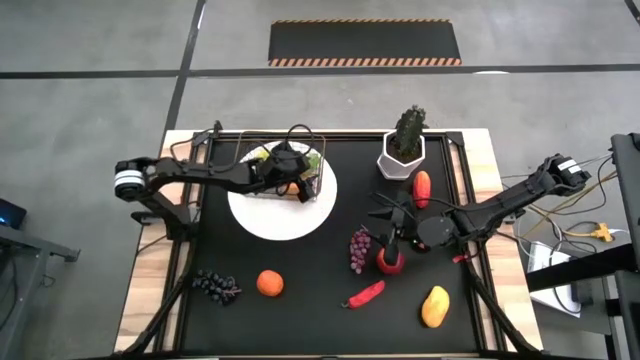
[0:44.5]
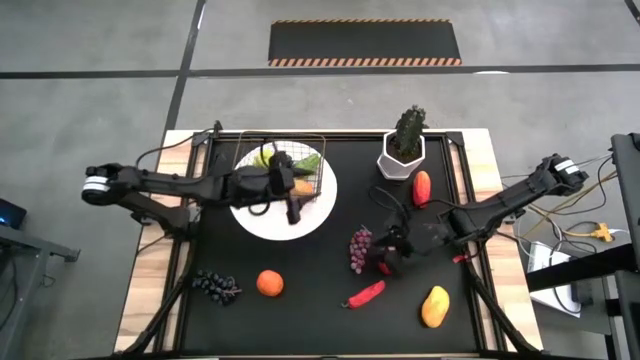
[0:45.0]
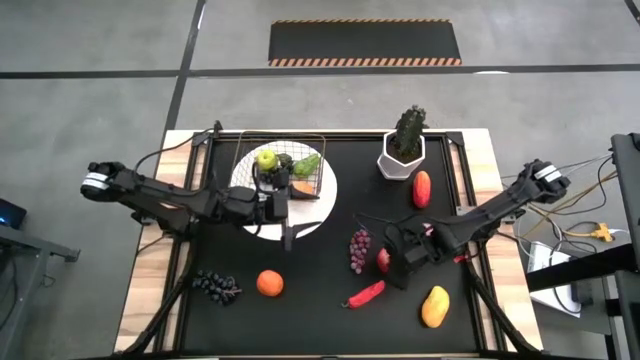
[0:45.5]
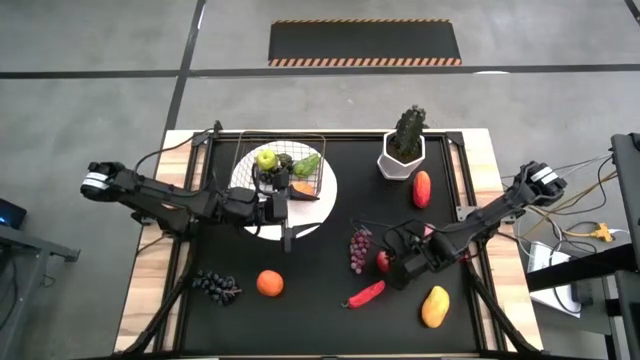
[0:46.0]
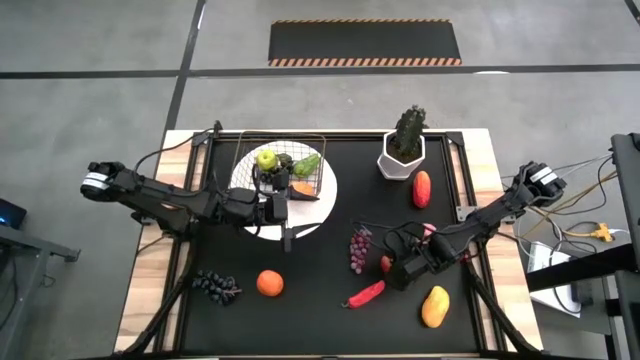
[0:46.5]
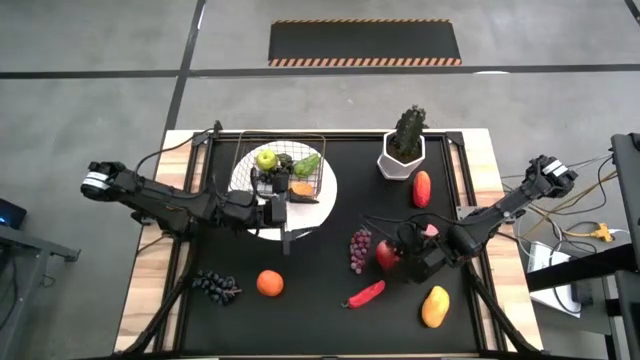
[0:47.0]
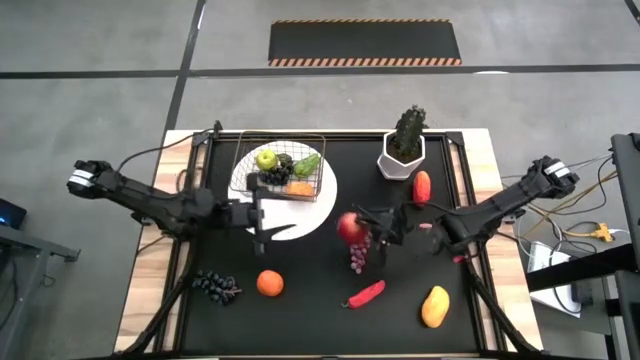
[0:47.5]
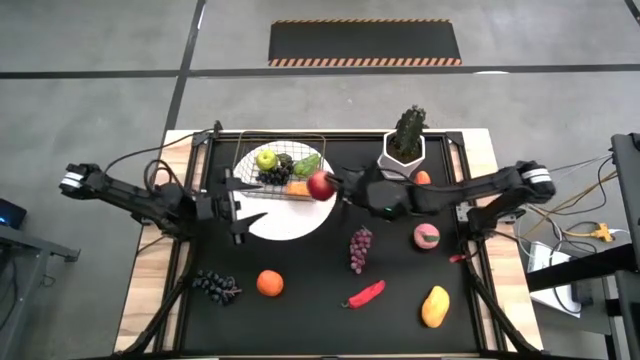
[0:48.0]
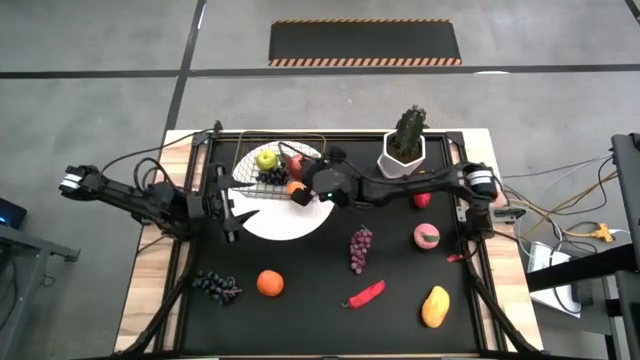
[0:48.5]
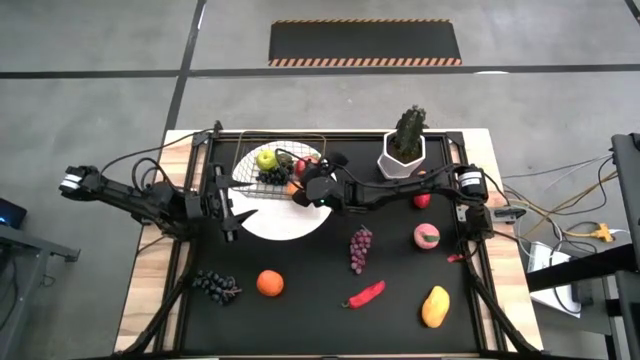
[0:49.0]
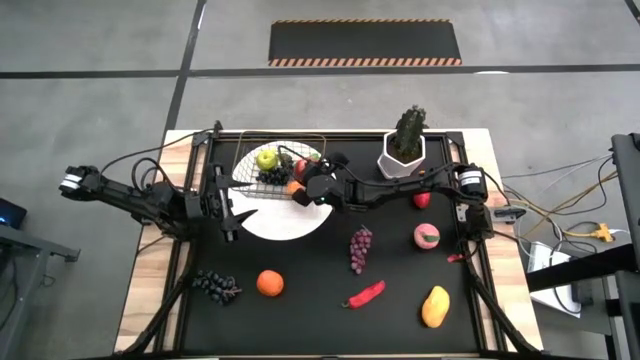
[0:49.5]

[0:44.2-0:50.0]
Task: Build produce basket
Put the pomegranate in the gold wire basket

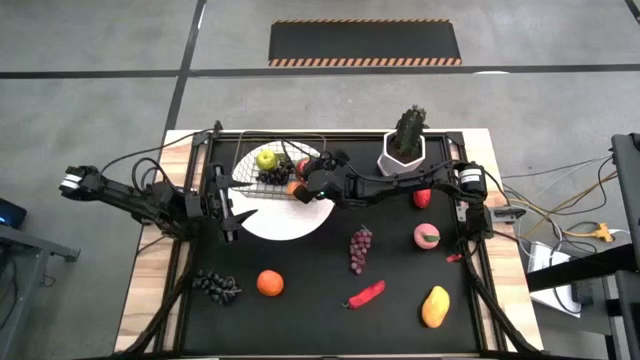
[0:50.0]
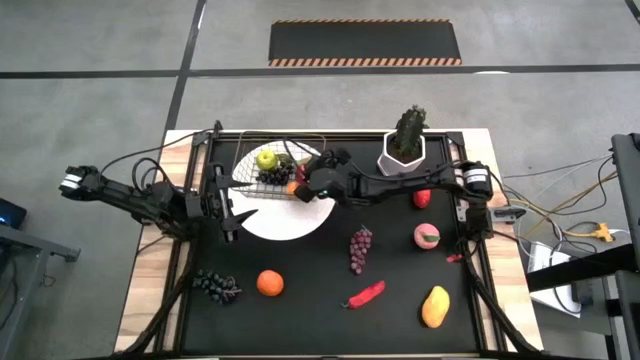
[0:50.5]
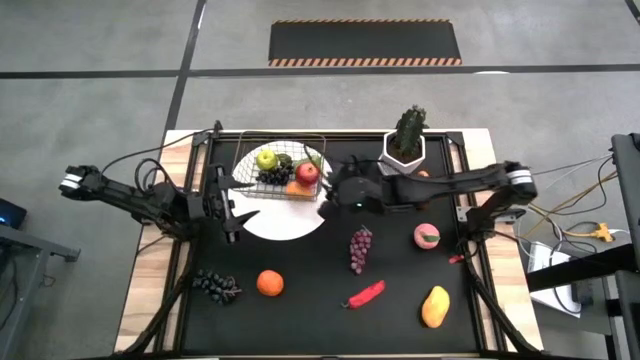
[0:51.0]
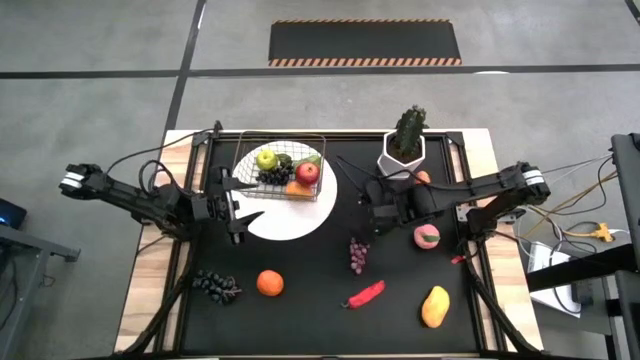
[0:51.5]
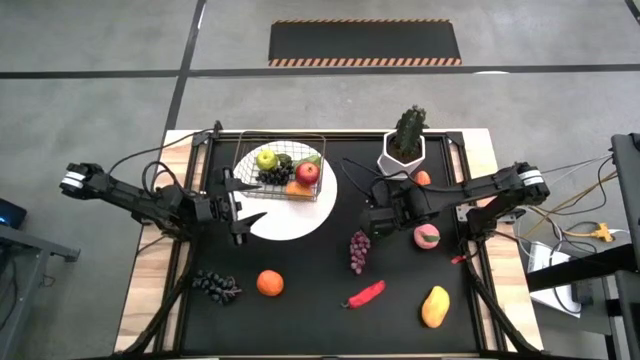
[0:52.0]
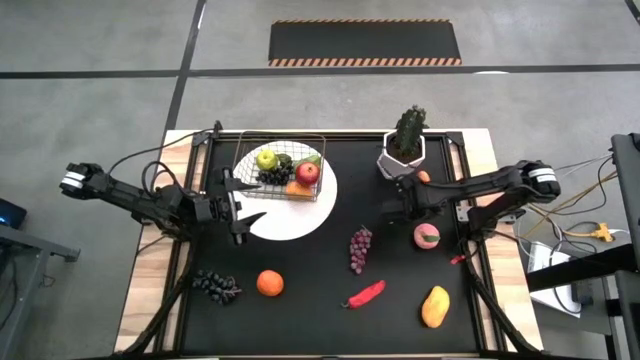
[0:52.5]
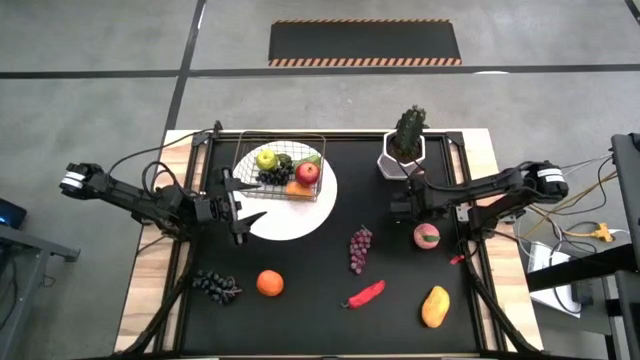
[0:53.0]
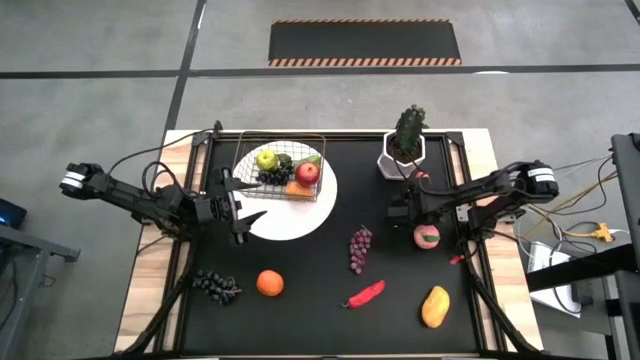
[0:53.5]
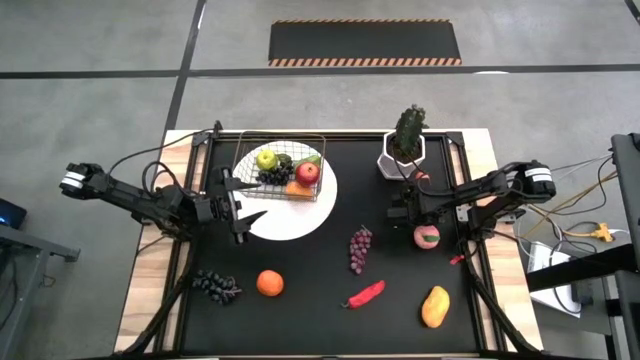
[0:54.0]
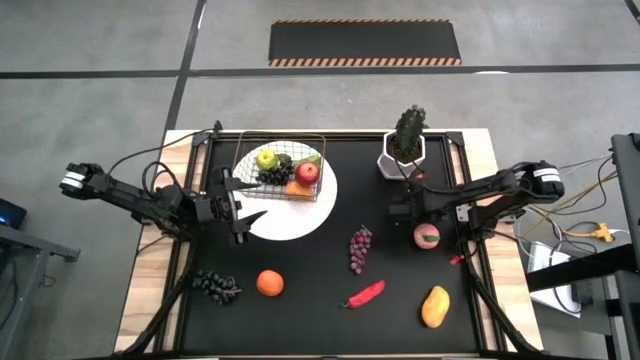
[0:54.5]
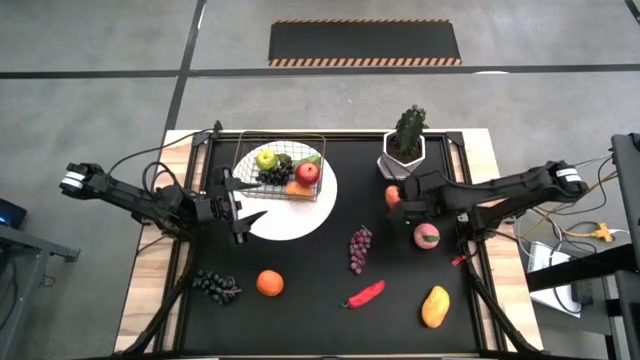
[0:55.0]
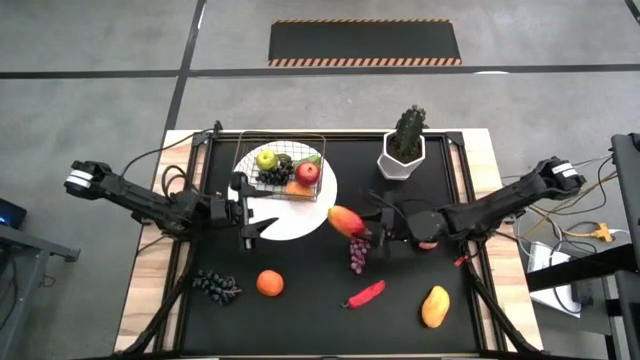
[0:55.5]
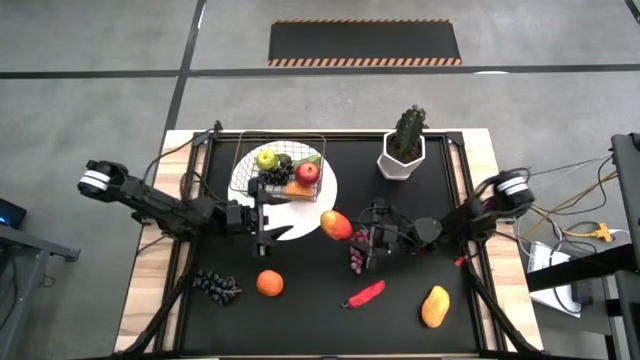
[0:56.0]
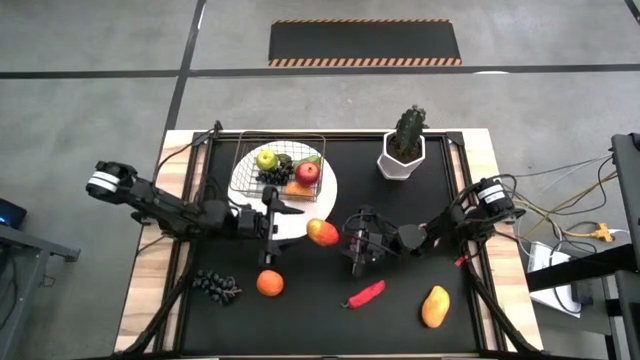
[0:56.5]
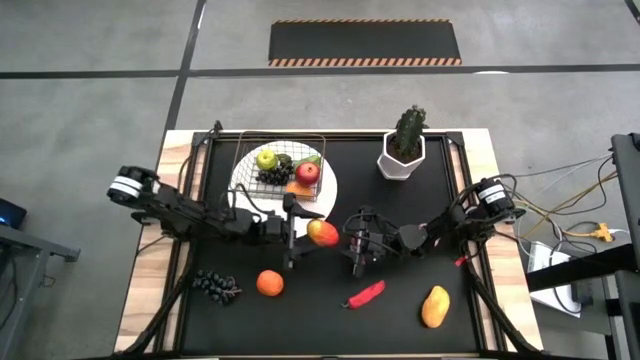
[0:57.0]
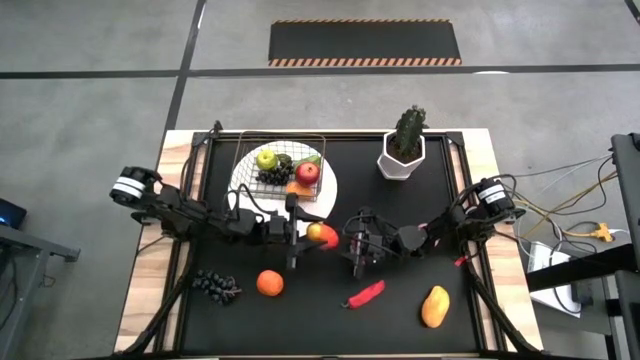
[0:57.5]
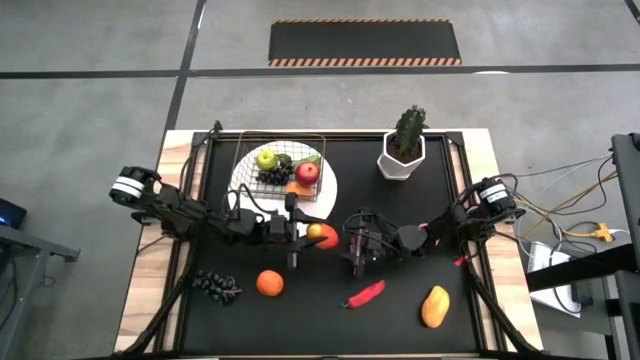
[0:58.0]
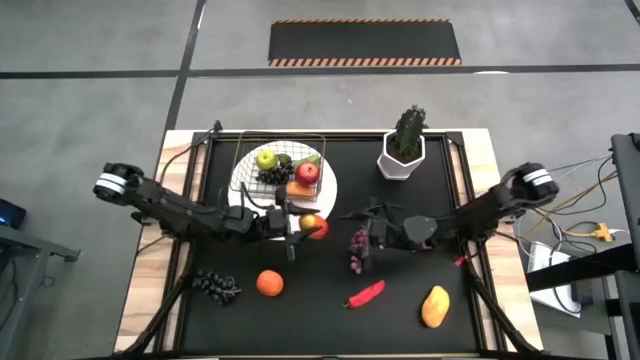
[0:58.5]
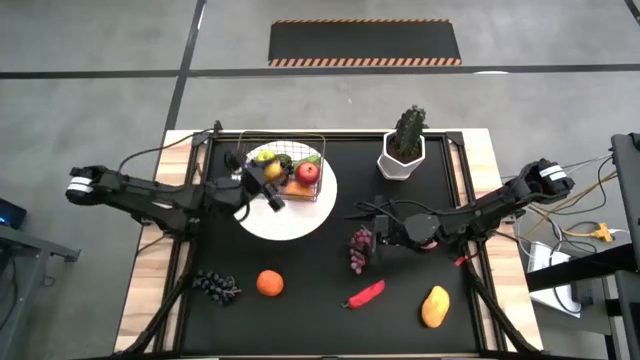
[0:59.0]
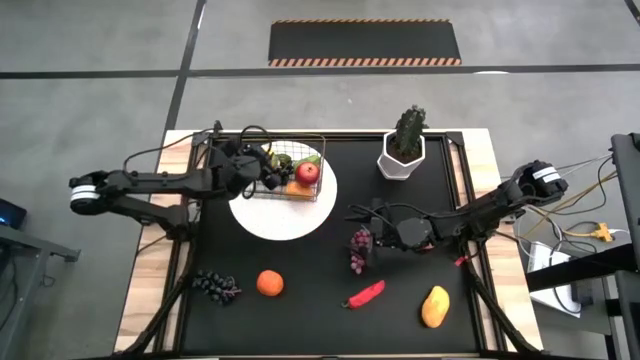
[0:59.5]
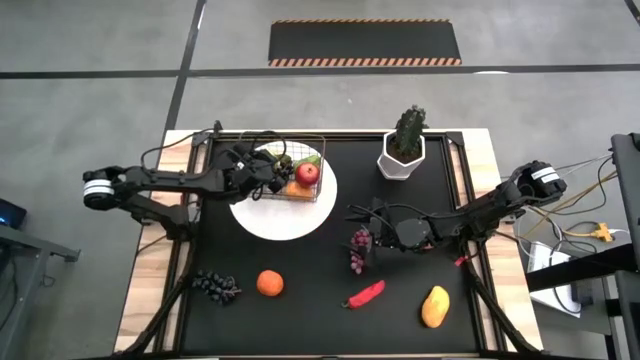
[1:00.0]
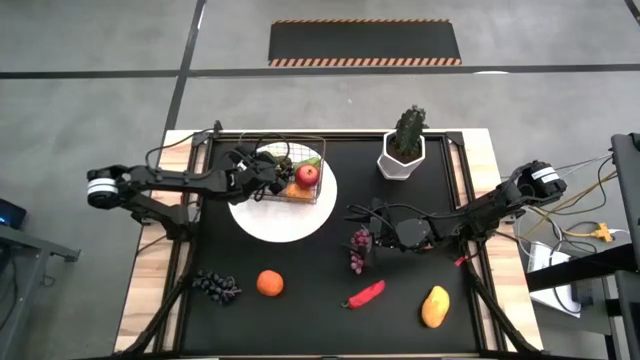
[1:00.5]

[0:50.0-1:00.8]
Put the top mango in the gold wire basket

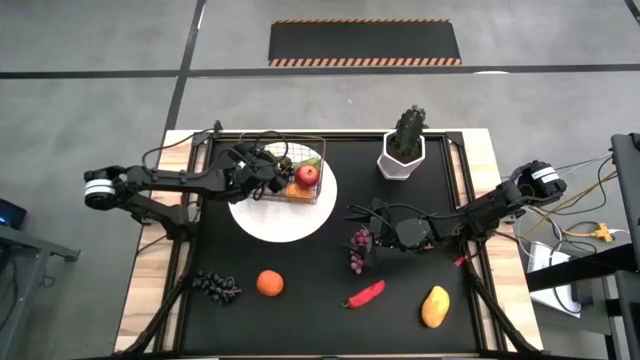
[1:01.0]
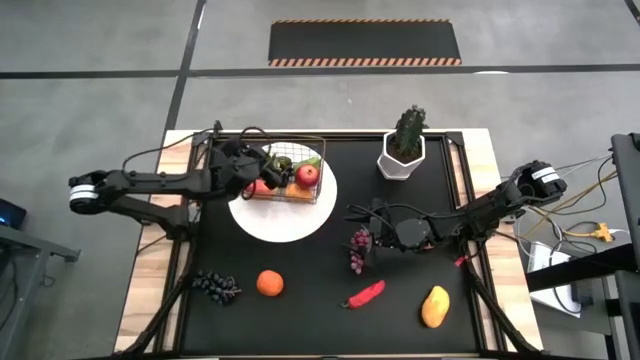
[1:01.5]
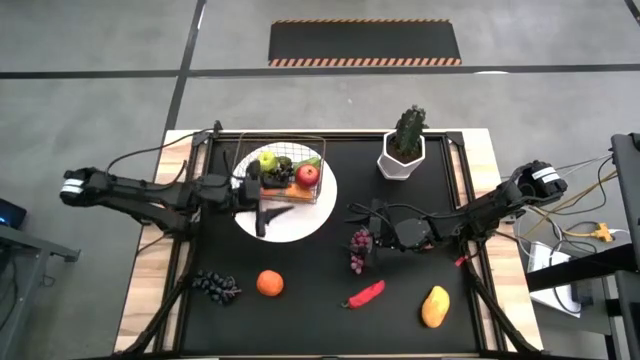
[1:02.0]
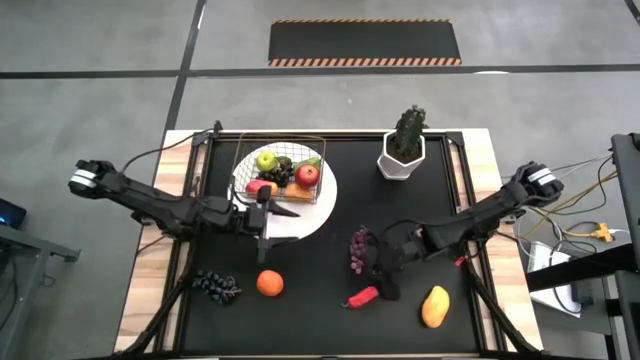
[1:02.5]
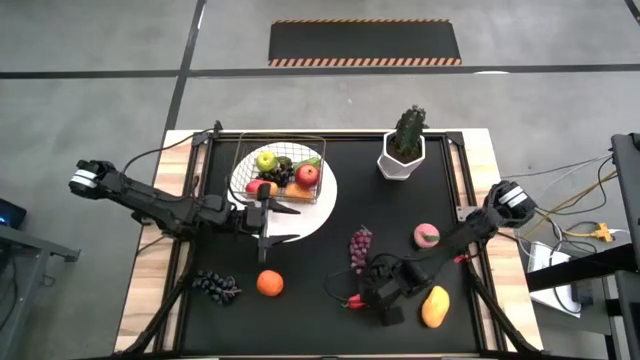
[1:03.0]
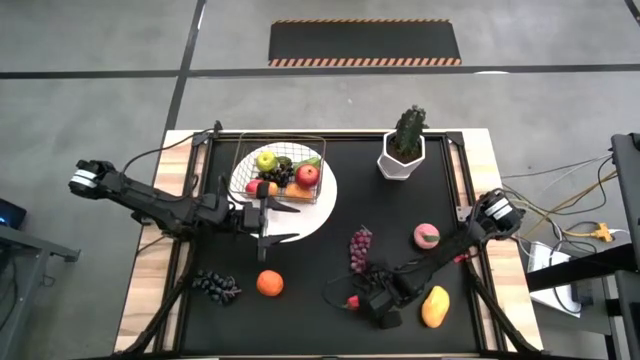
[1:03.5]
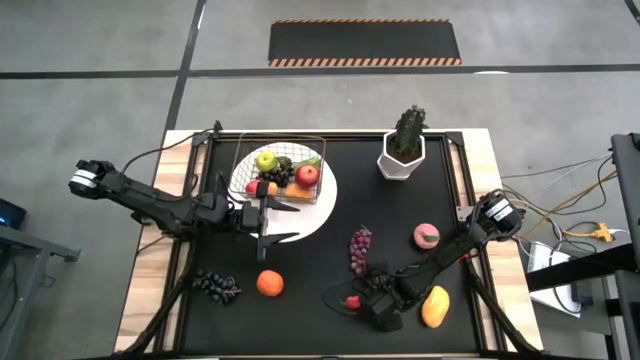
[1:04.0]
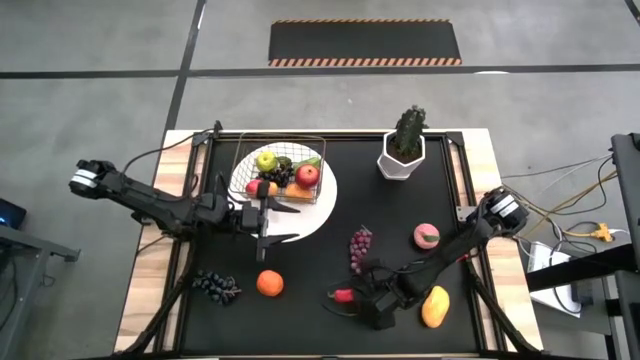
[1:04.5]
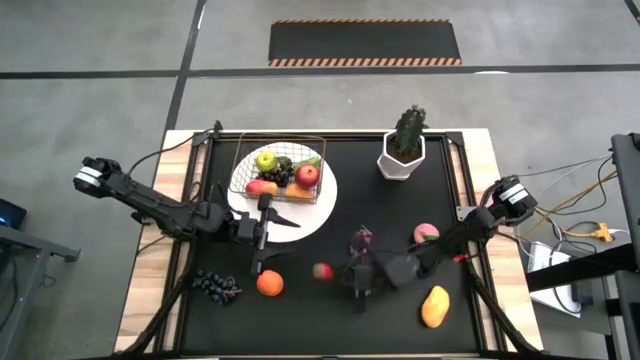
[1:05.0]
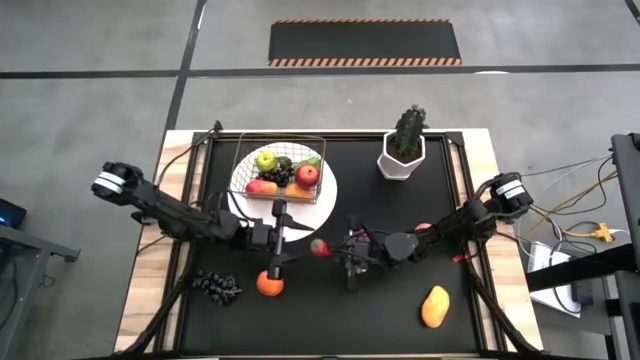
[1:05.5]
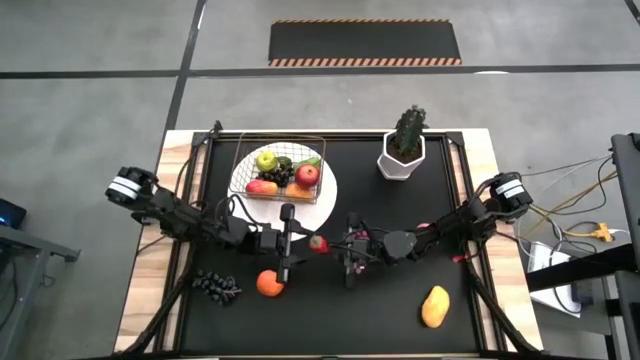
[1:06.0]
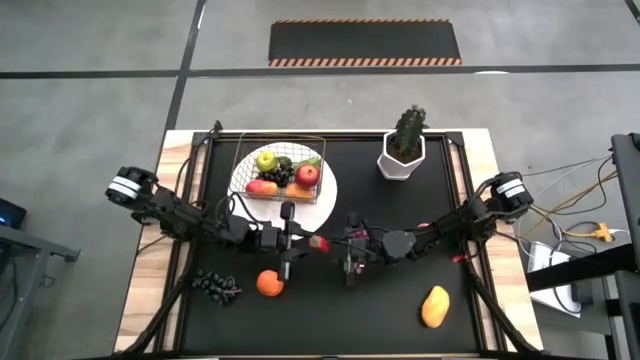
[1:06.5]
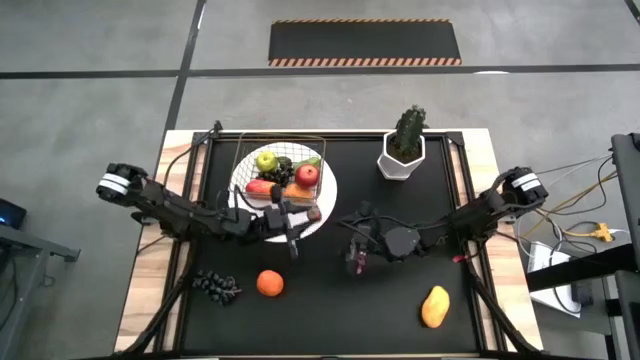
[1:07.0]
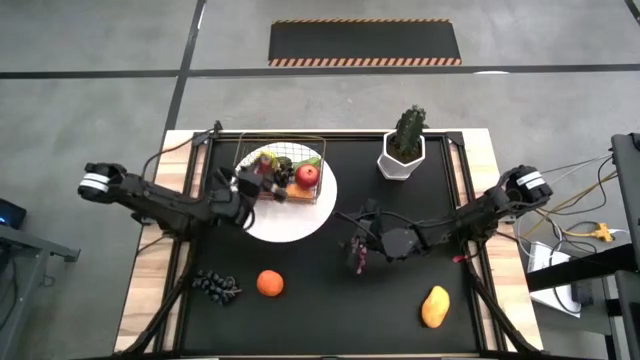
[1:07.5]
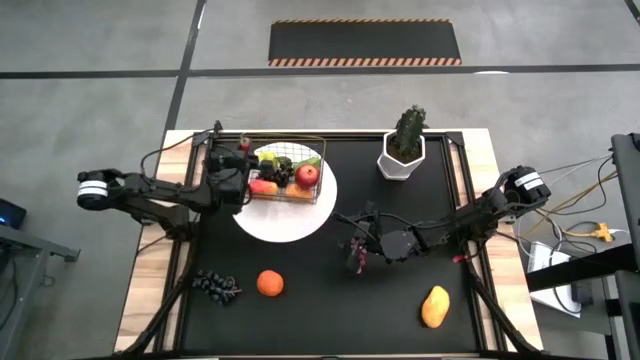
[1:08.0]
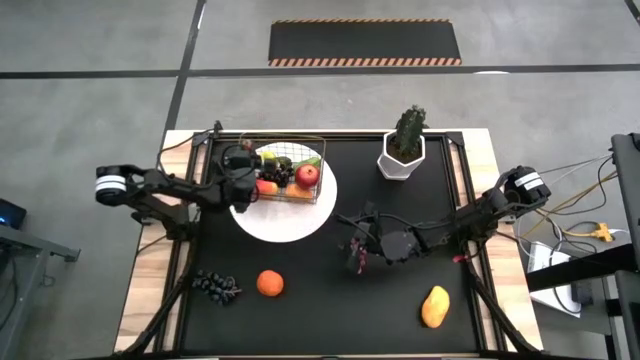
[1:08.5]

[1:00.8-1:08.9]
Put the red chili pepper in the gold wire basket
